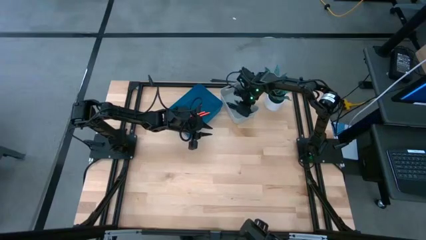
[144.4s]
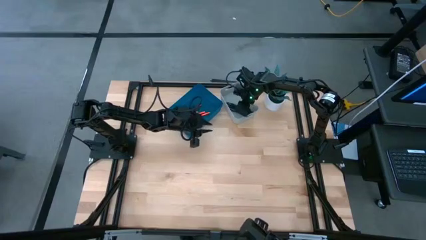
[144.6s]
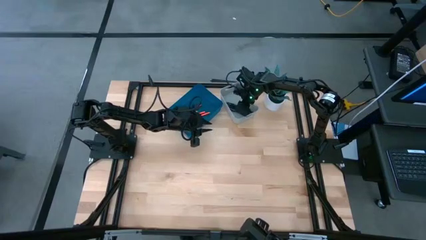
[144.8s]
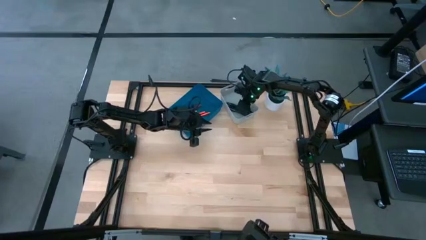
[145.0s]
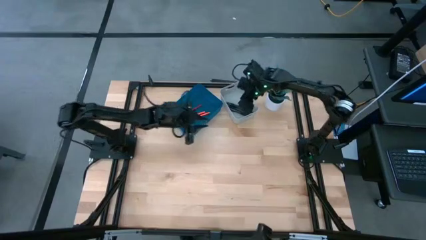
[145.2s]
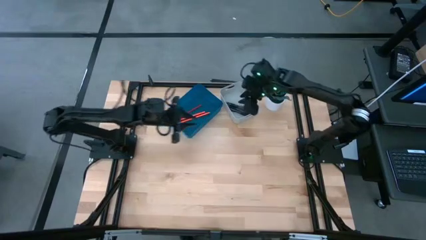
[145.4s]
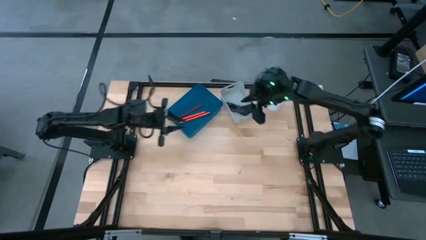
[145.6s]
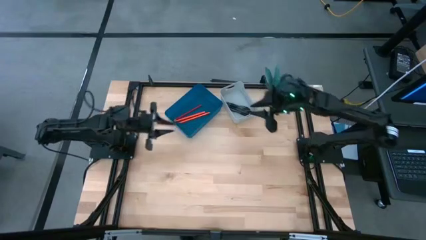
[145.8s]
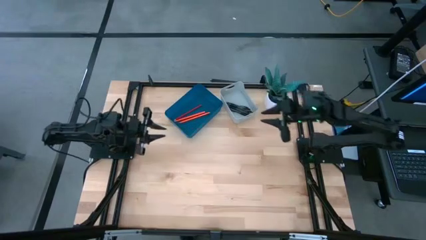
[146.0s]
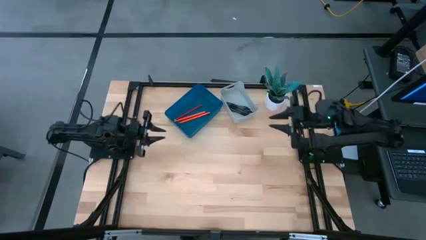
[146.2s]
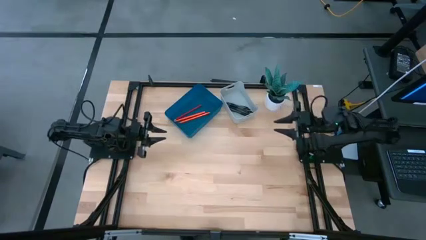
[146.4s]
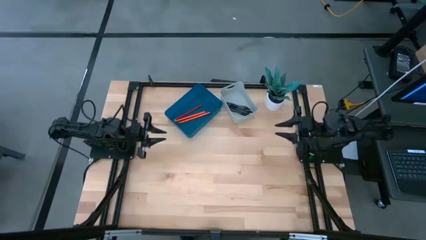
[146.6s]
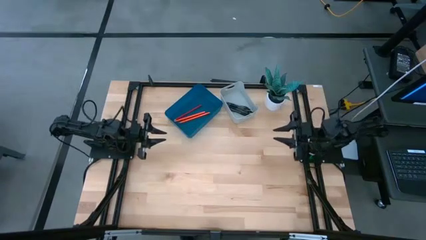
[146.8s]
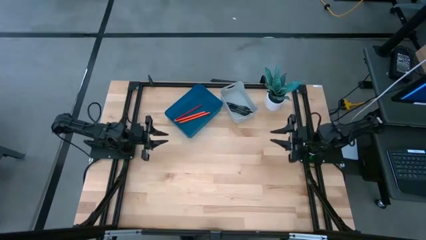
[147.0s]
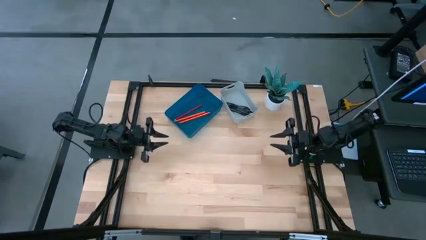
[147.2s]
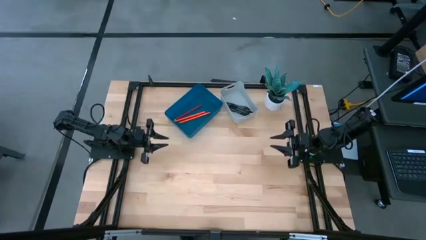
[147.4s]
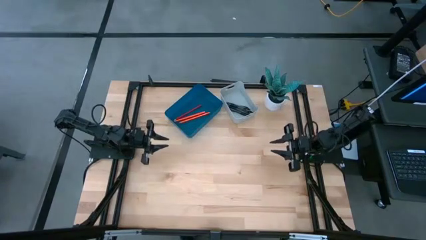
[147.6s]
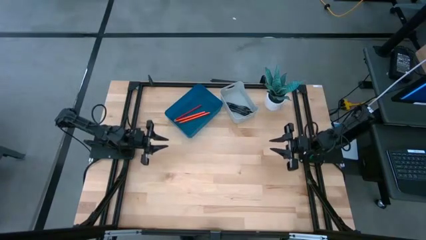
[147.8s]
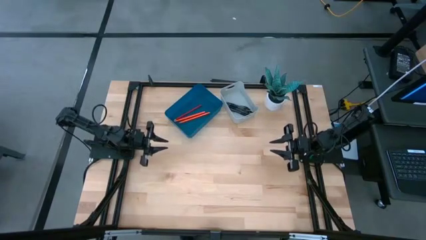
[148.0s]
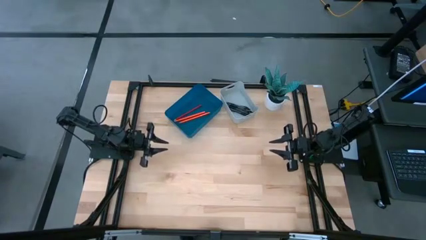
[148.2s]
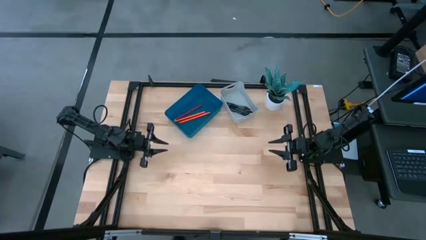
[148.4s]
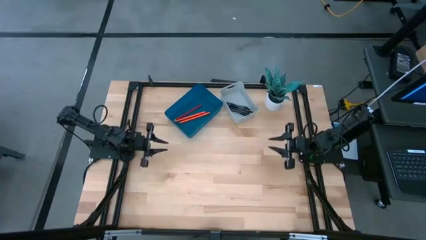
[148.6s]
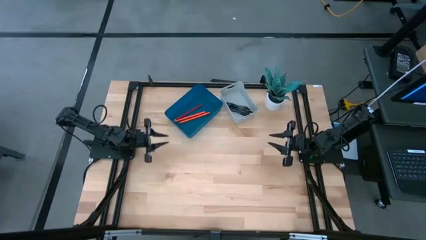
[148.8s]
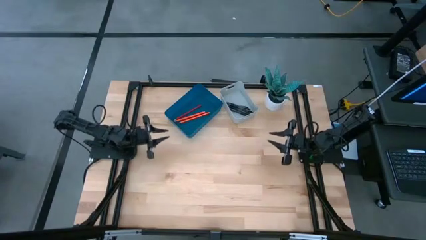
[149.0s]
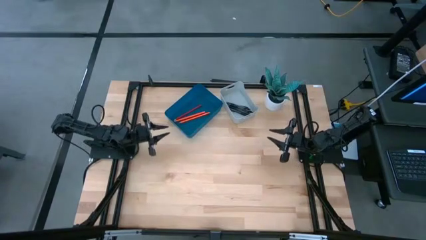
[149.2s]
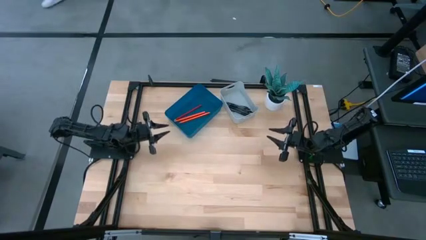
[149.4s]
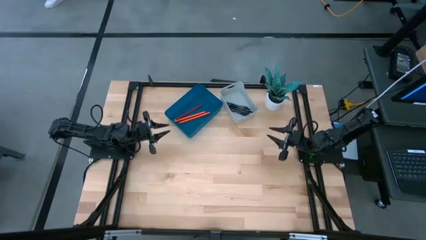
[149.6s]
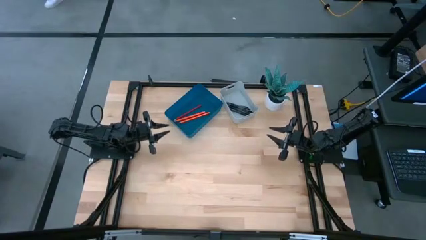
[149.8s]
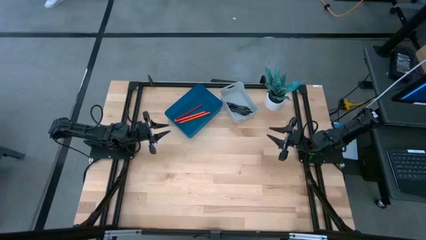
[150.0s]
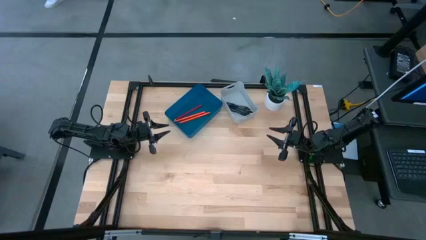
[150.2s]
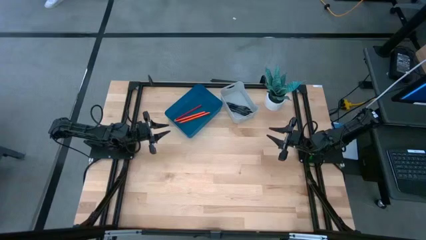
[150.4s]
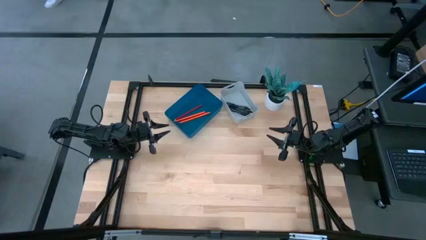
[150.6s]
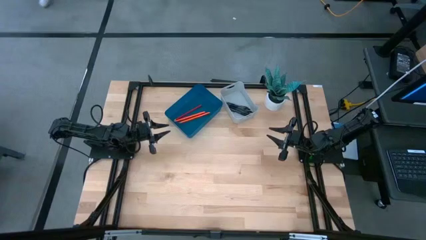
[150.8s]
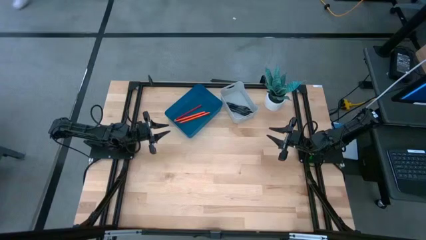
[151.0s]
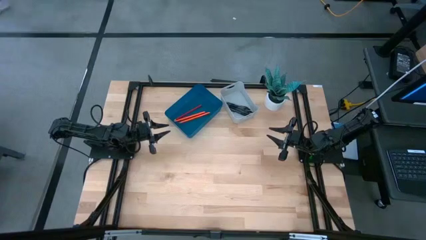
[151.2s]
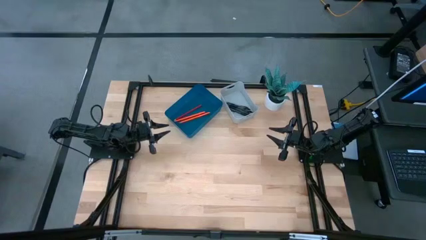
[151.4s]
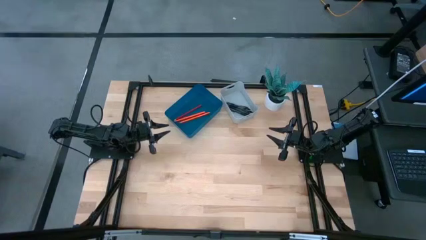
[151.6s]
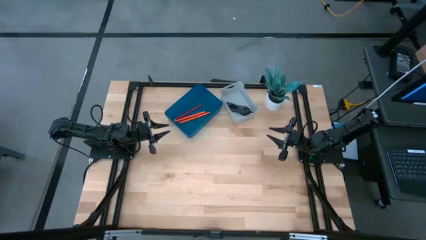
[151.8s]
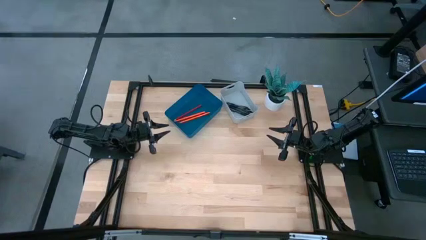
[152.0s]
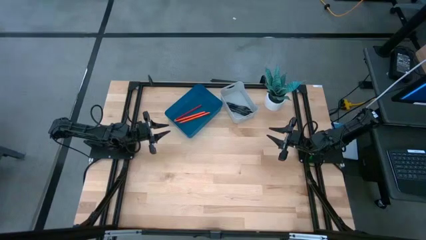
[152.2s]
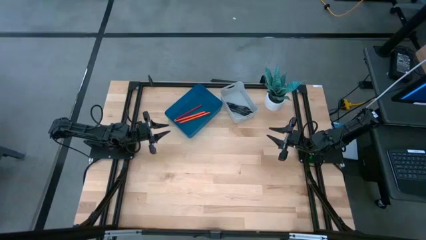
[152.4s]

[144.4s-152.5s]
Task: Sort pens & pencils
Return to Home Position

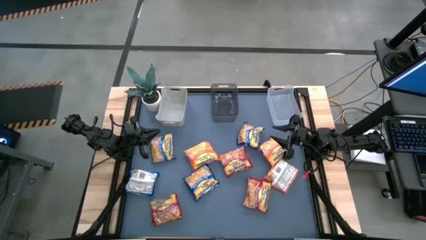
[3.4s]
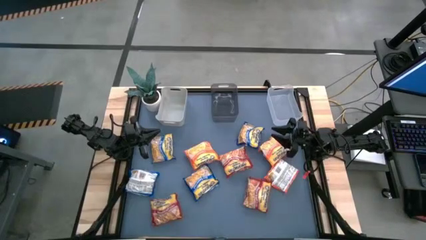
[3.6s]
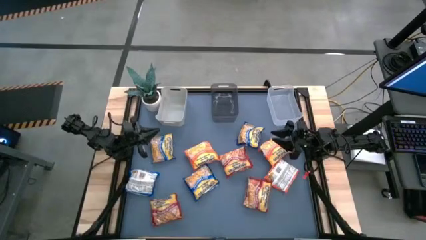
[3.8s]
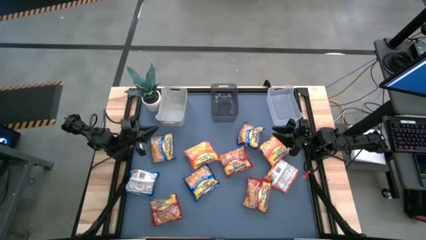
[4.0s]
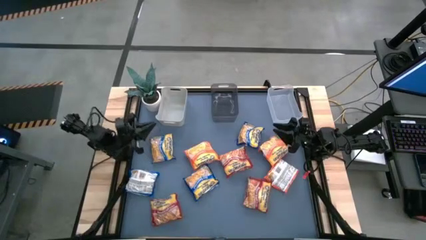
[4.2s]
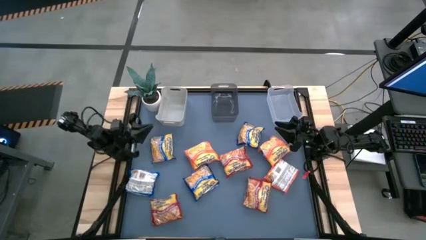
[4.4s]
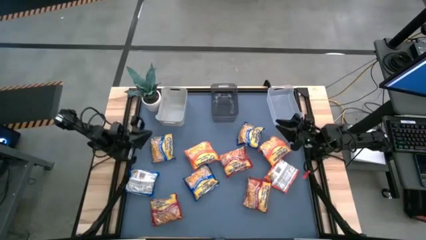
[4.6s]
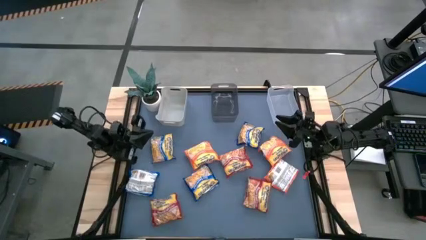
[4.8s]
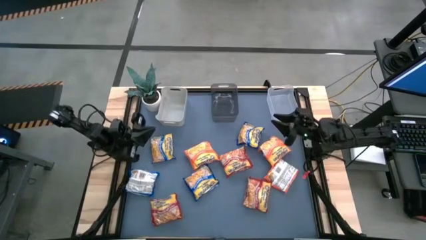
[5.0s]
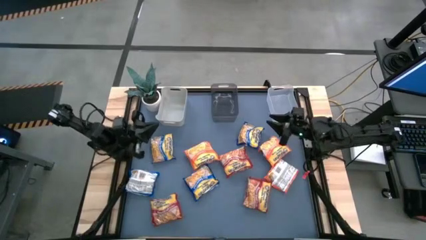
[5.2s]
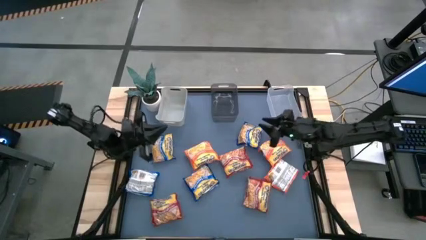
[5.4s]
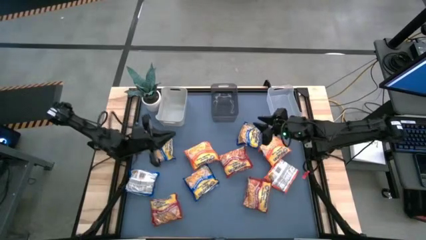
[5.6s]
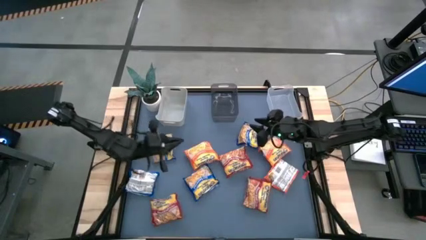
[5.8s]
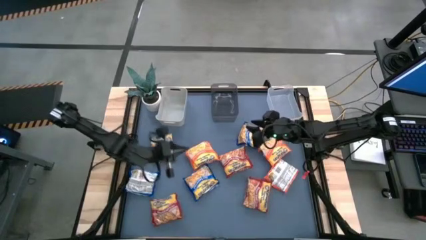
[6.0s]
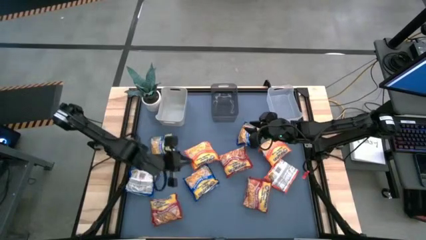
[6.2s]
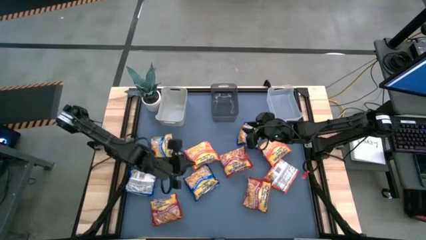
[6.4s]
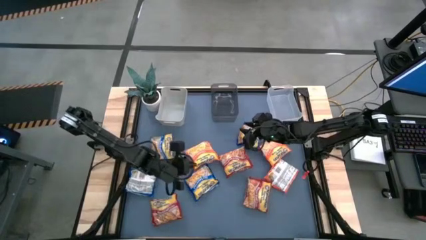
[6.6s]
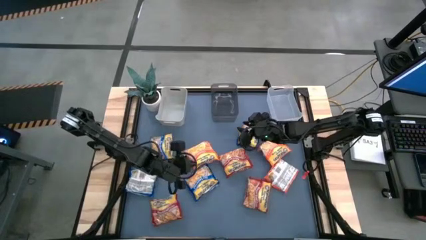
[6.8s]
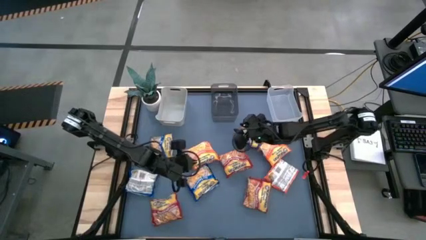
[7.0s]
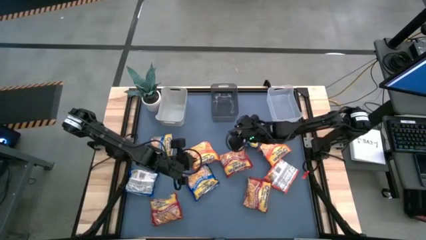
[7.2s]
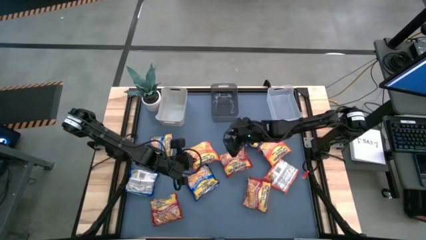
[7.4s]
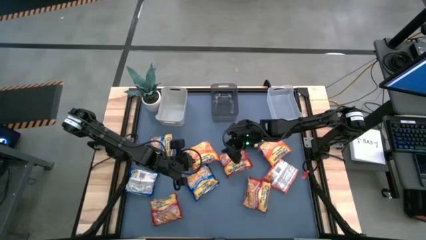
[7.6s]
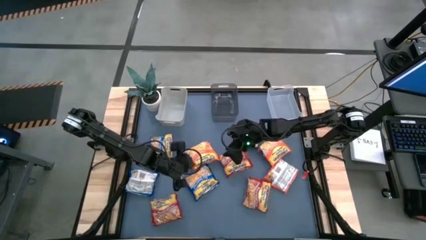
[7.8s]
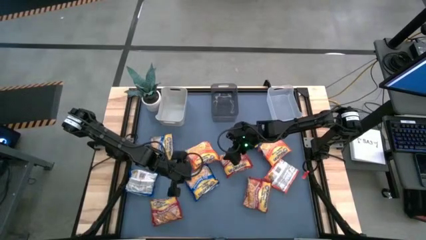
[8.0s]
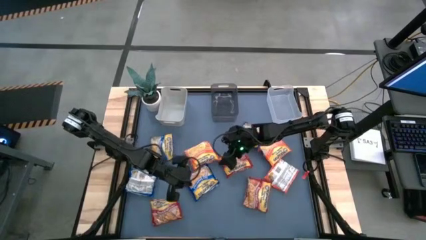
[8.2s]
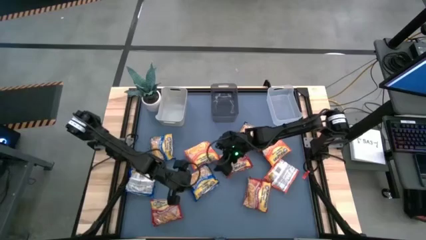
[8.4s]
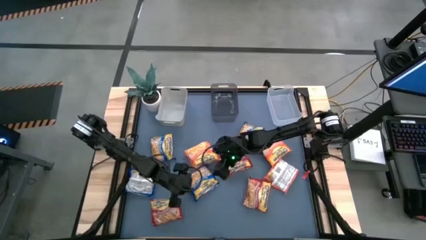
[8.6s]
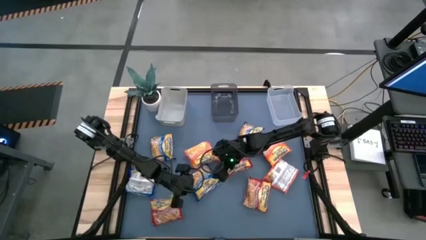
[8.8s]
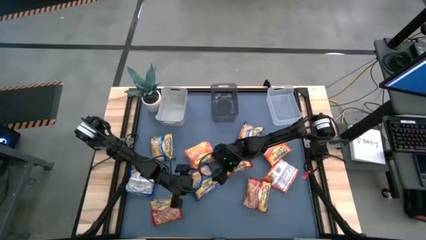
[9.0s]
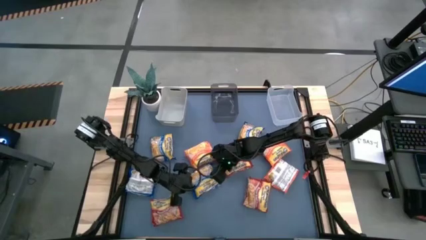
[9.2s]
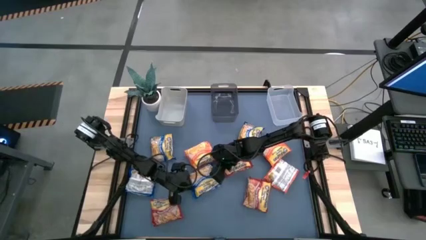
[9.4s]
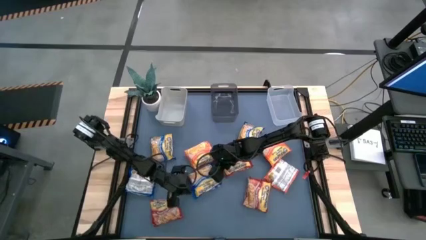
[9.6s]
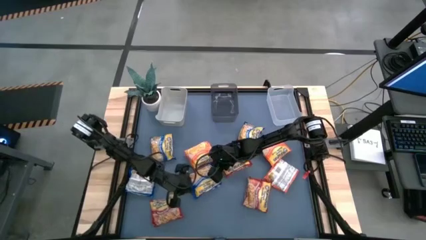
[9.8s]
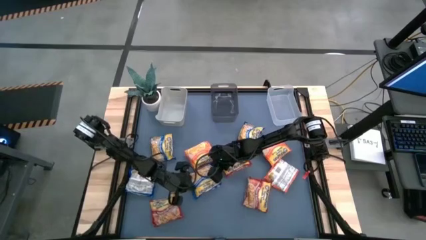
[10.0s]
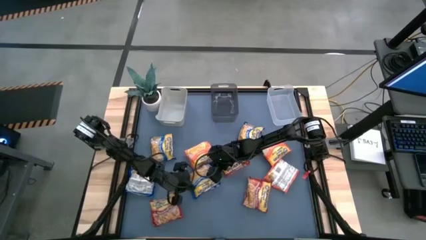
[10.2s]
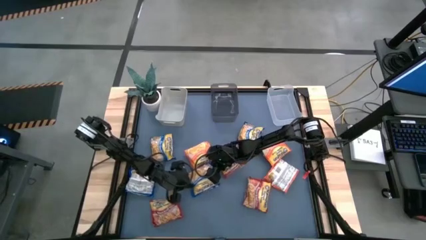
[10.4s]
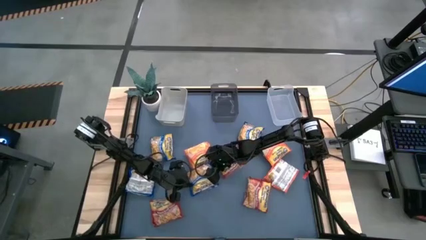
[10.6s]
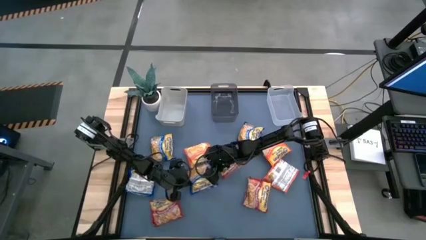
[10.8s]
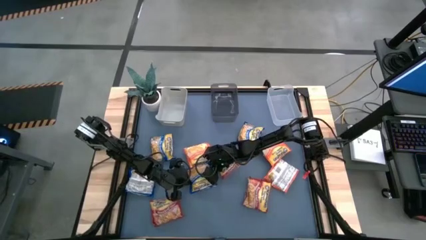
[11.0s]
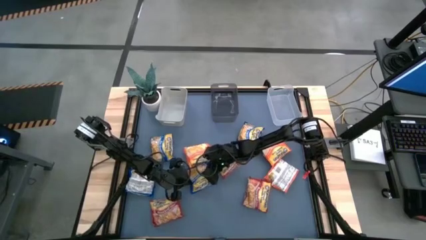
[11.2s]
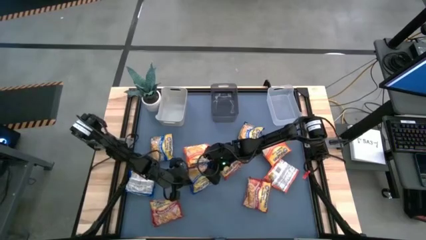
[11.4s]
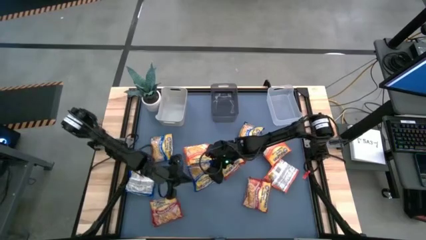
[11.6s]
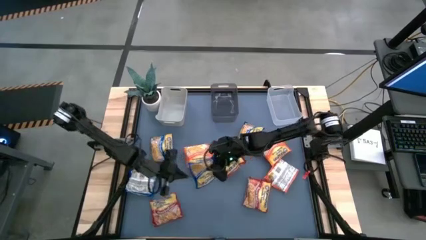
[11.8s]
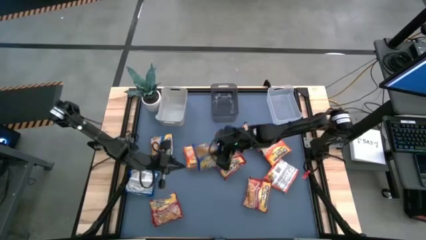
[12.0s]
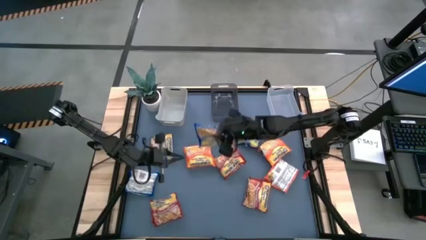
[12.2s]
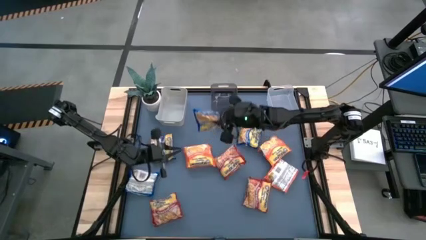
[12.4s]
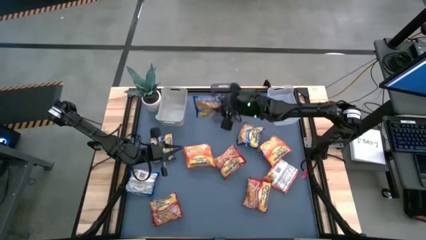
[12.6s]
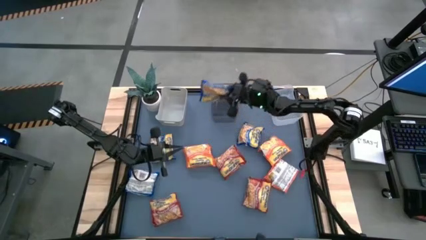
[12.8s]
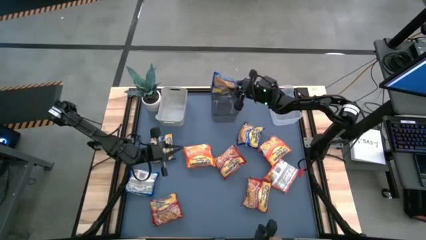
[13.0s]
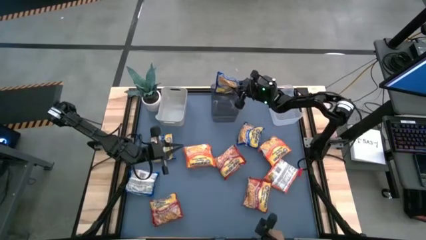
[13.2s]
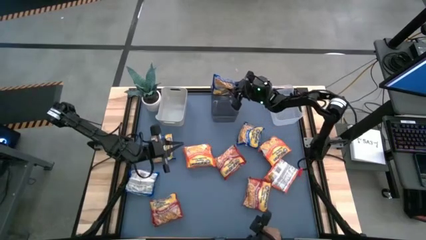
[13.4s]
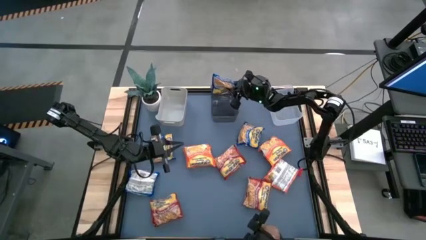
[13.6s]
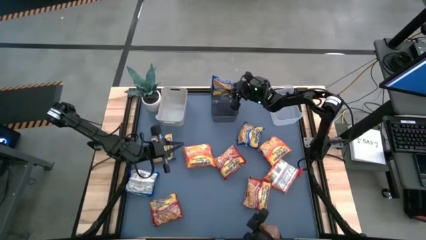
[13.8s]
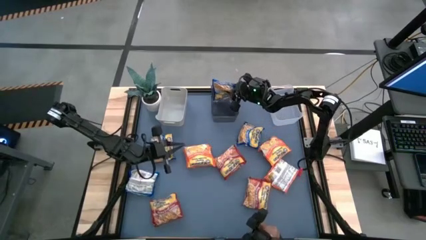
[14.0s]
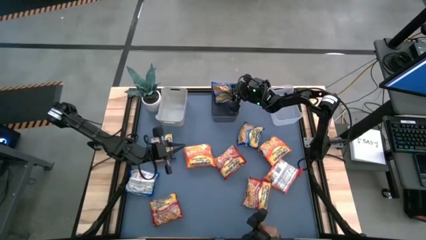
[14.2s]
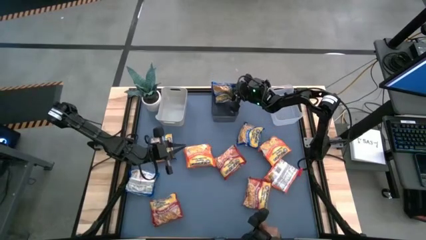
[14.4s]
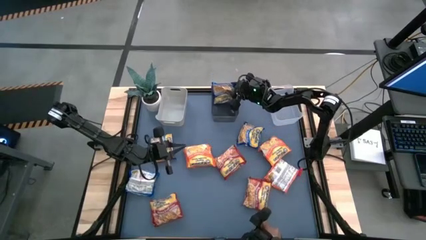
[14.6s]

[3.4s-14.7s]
Task: Sort Maruchan noodles
Put the blue noodle pack into the black bin
